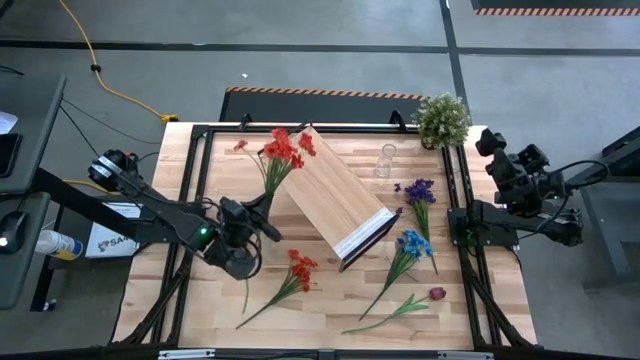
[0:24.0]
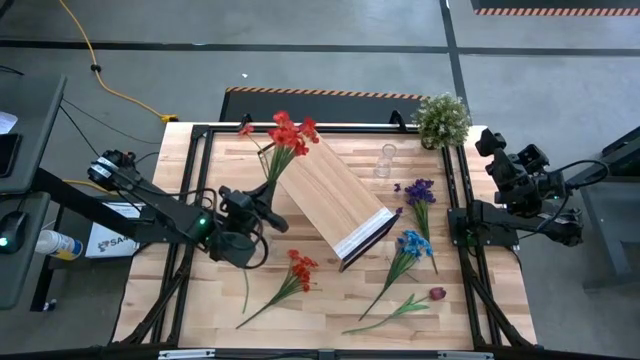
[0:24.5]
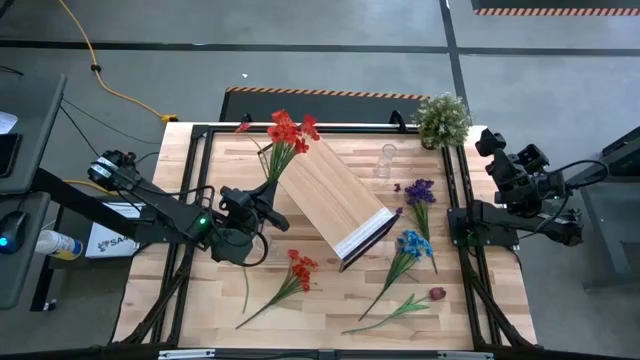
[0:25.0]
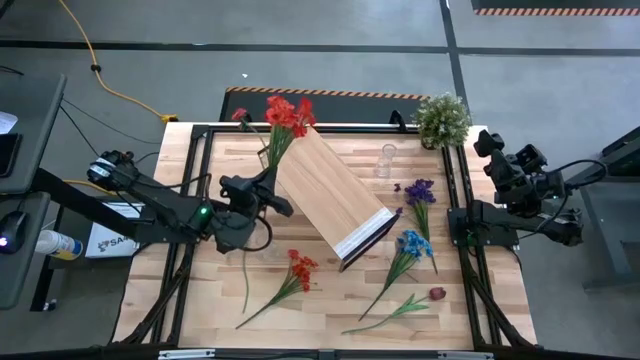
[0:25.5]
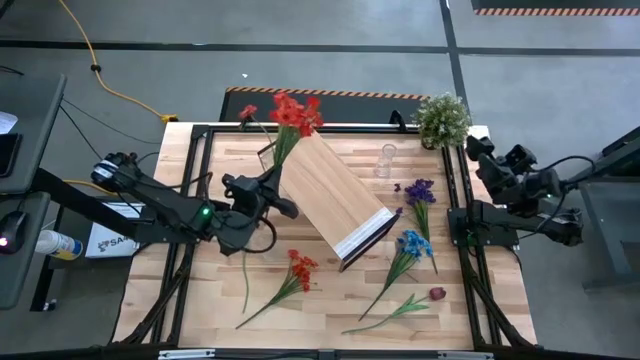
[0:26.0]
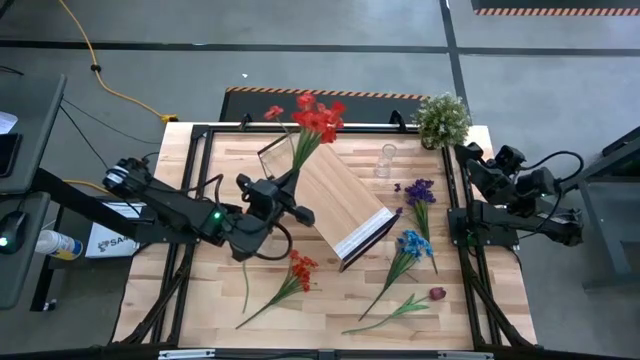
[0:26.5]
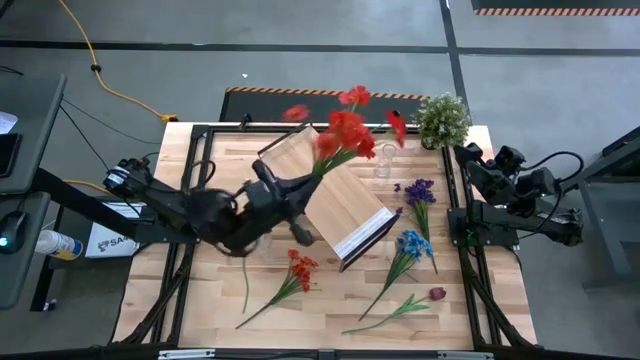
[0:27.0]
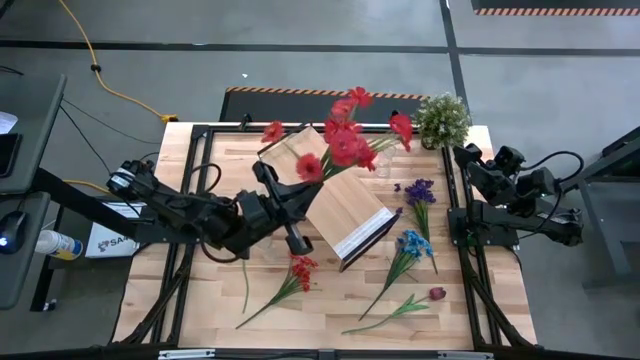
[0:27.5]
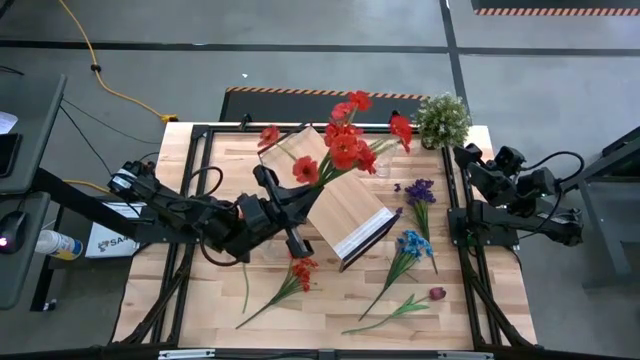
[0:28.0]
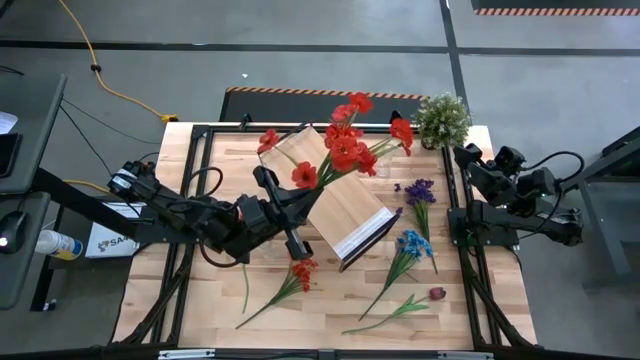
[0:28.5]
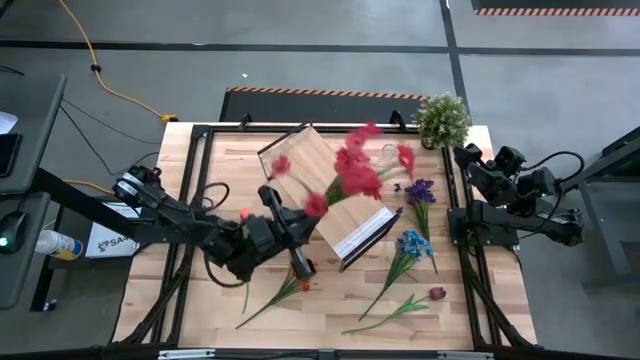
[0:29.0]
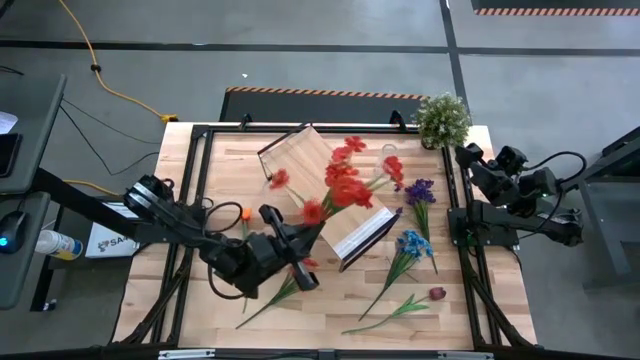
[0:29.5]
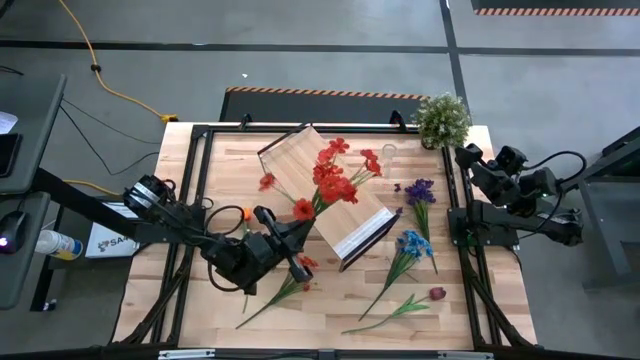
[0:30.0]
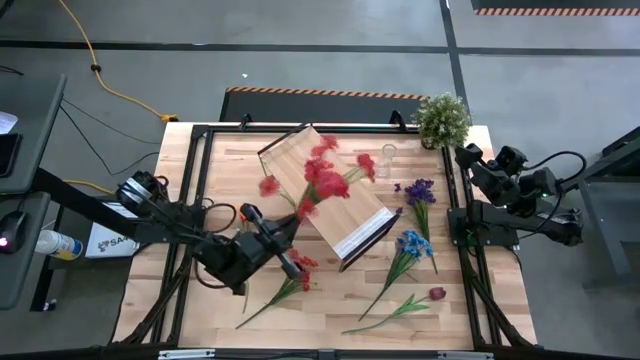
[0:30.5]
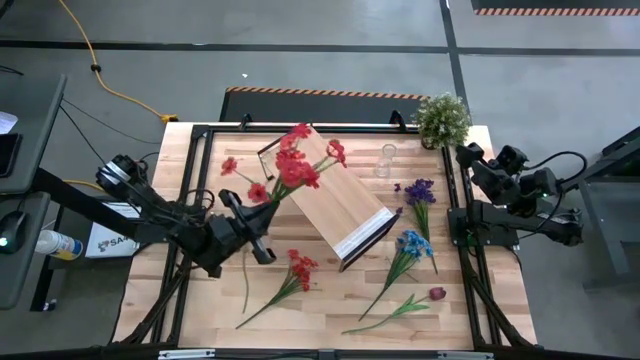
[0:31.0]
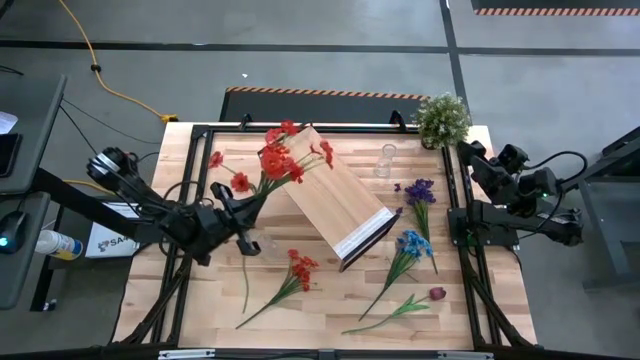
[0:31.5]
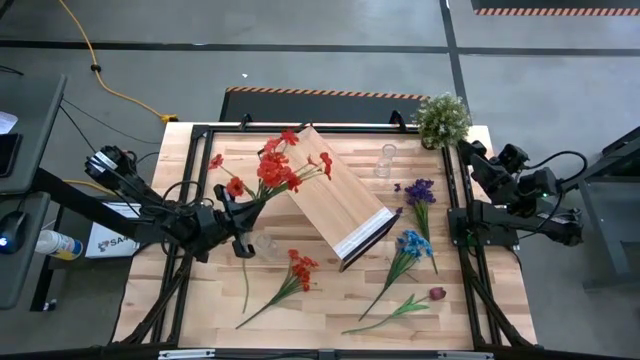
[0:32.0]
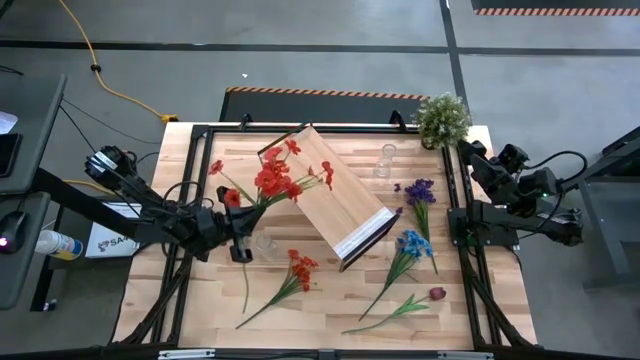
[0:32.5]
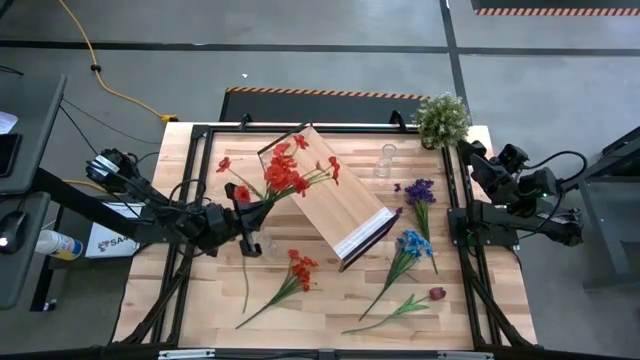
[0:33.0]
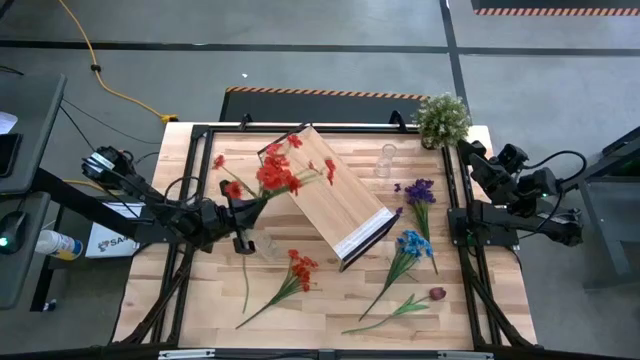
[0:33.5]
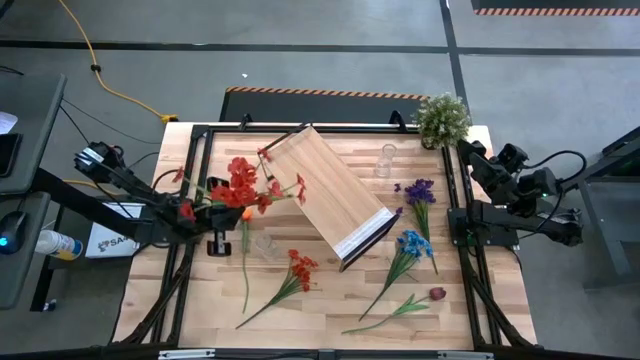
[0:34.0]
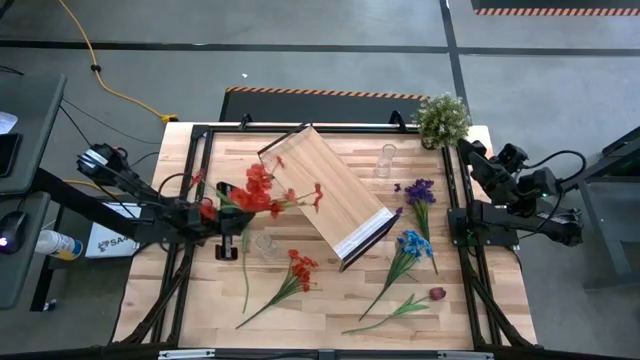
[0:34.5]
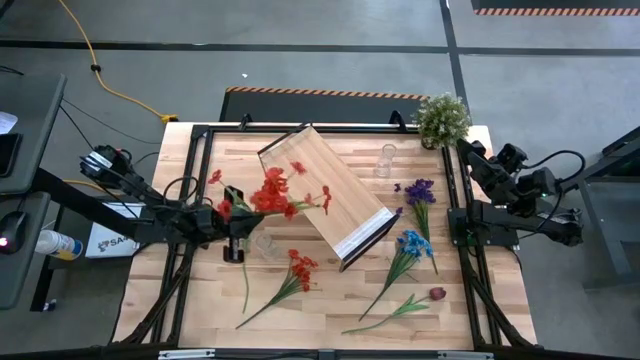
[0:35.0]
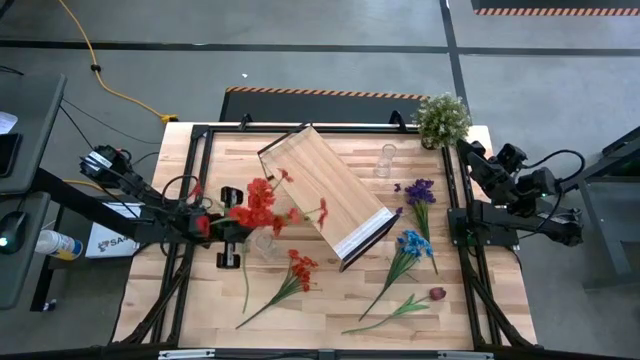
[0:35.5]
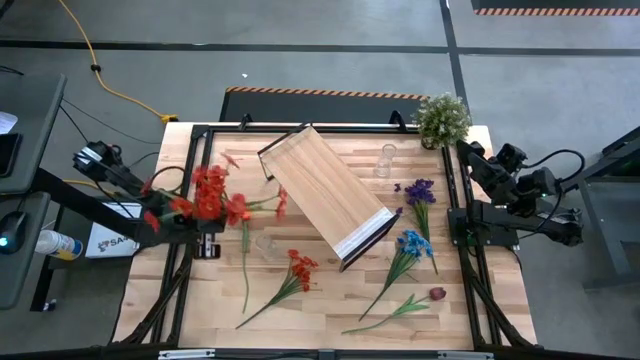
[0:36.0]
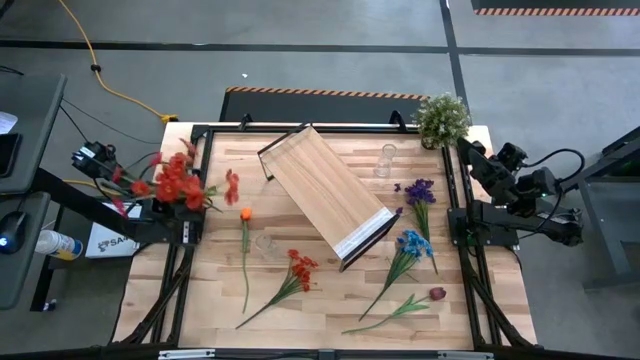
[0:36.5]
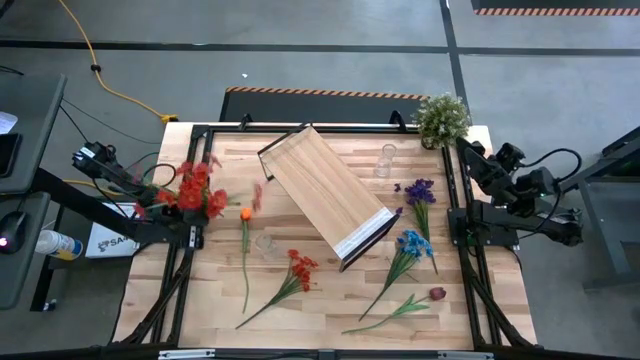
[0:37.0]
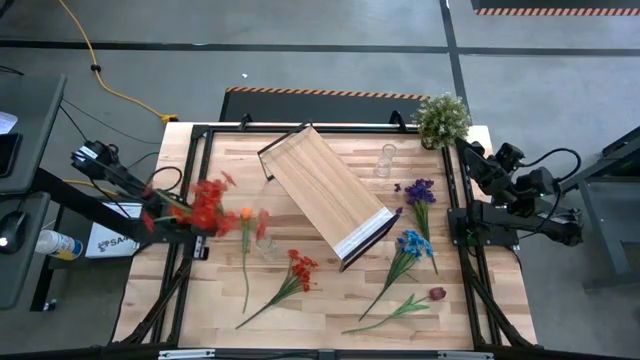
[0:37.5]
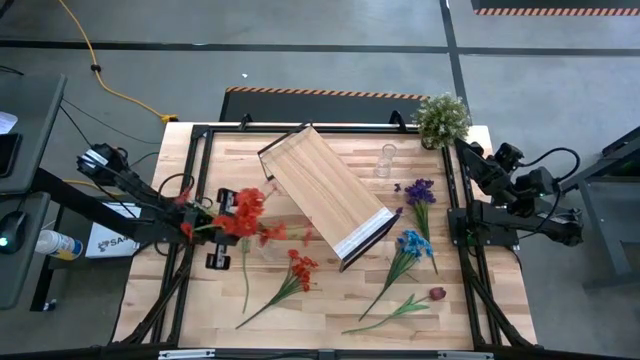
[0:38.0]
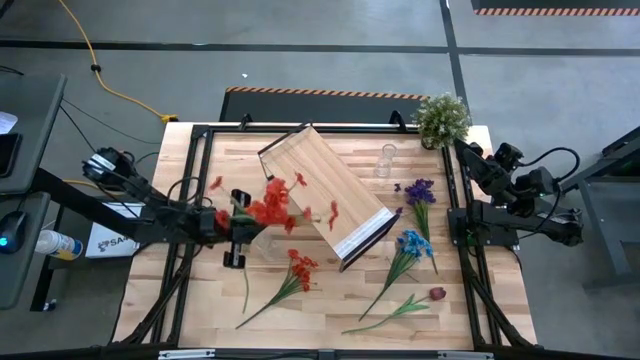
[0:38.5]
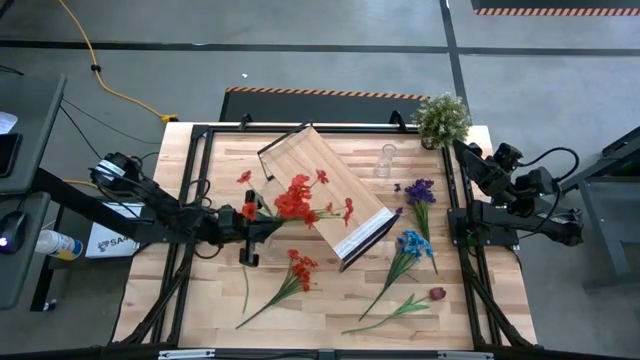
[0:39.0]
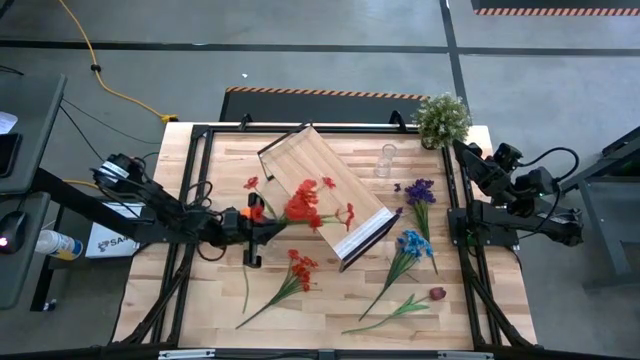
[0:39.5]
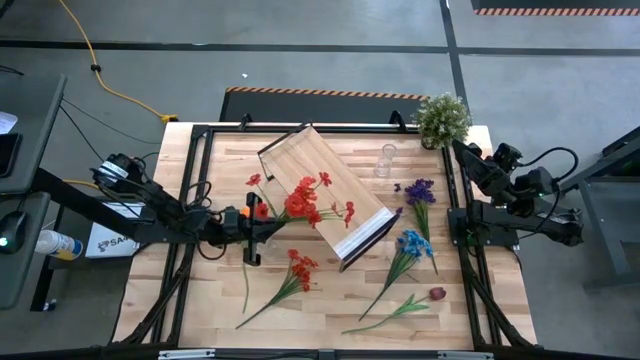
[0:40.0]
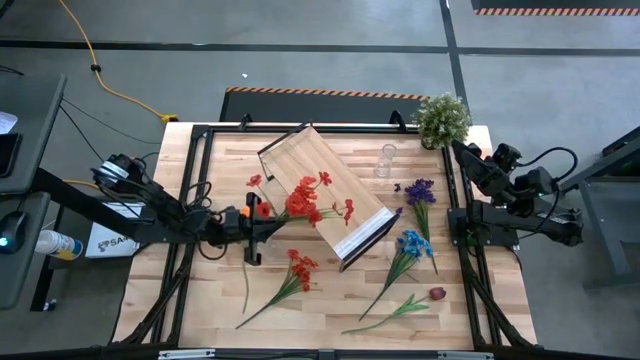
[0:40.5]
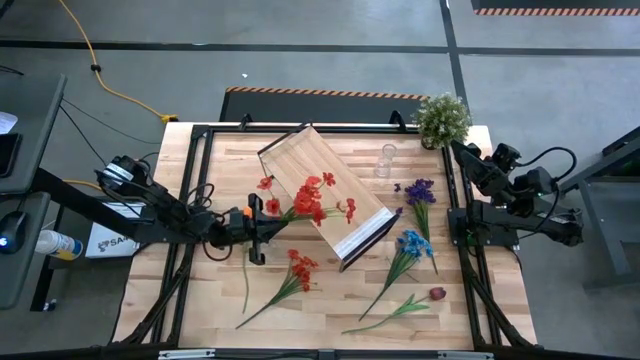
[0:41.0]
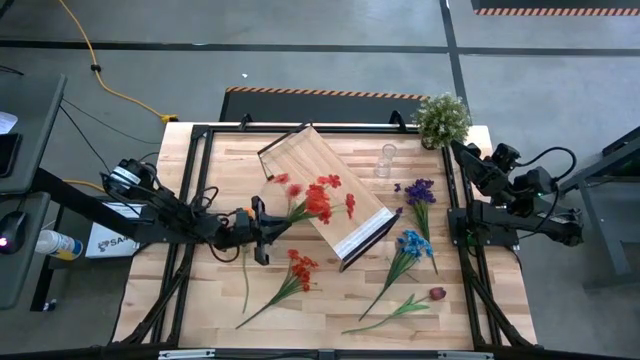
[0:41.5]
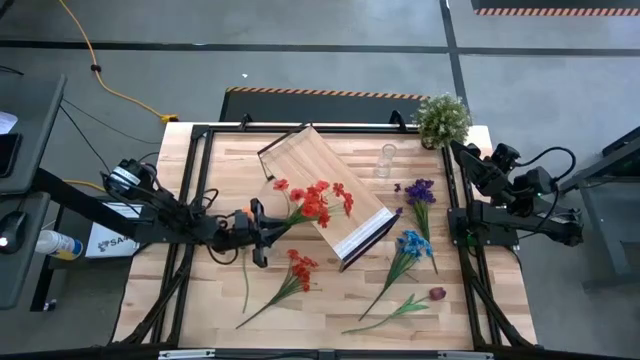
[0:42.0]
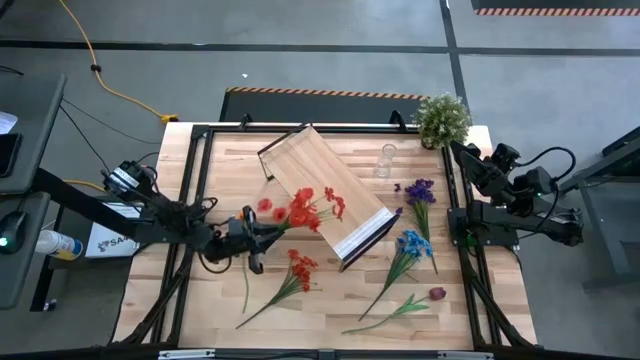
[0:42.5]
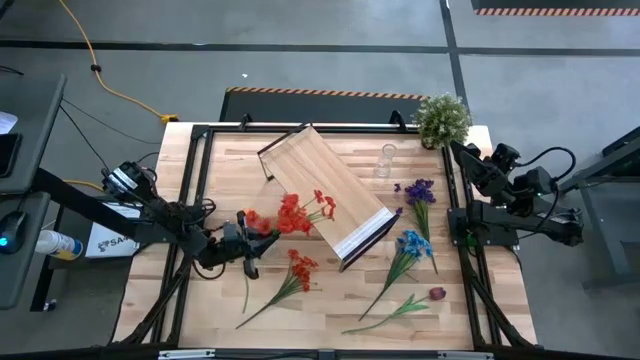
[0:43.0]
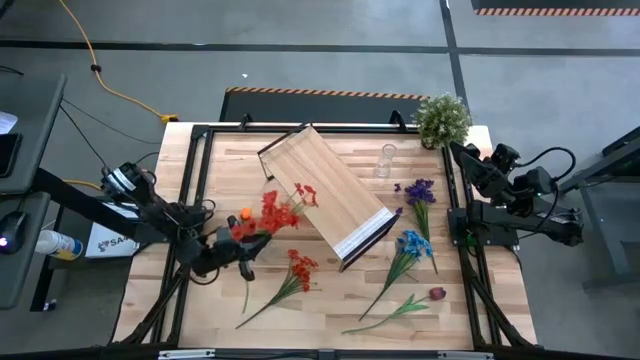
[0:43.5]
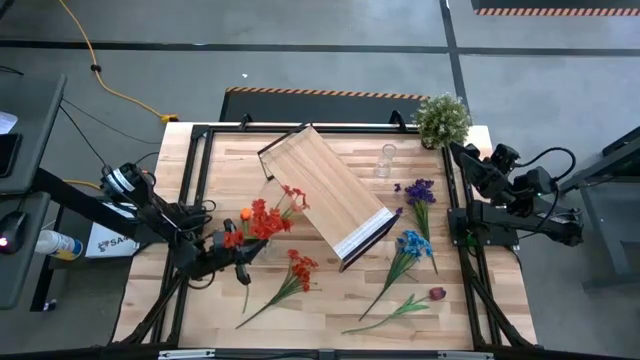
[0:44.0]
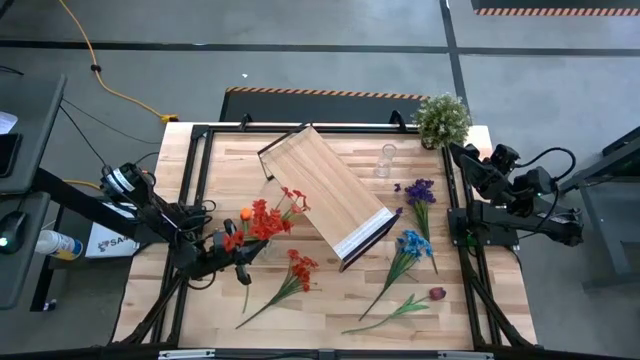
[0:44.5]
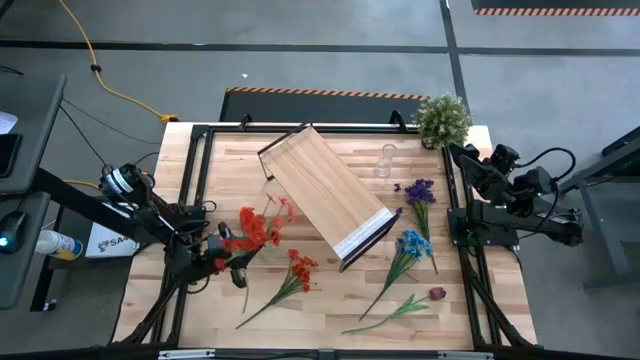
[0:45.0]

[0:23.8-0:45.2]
Task: Pick and place flowers into a vace then onto a shelf
Put the top red flowers into the bottom transparent vase

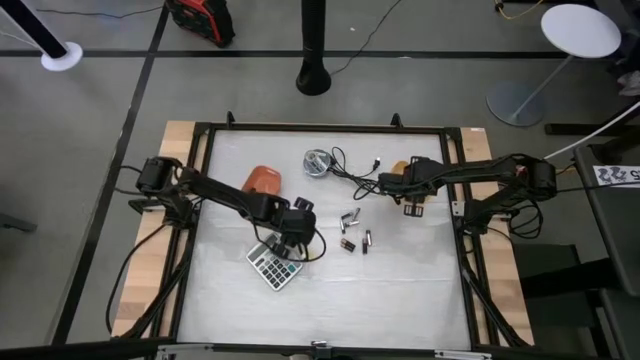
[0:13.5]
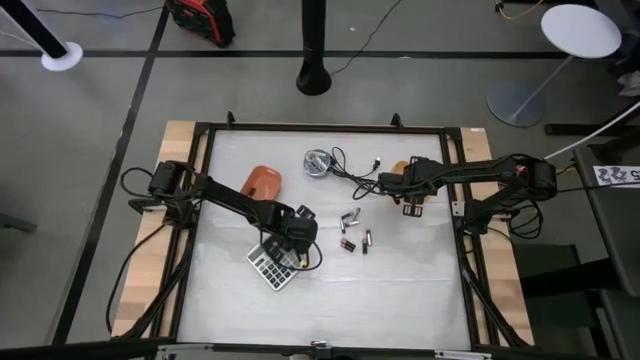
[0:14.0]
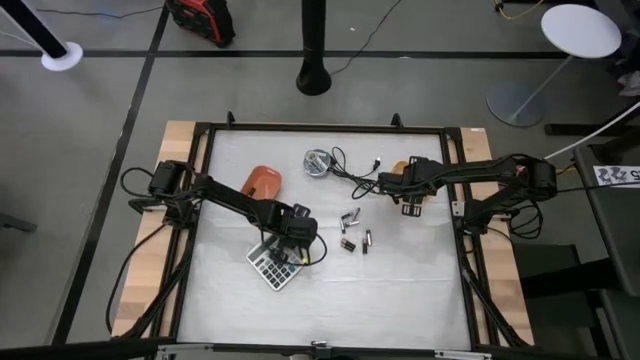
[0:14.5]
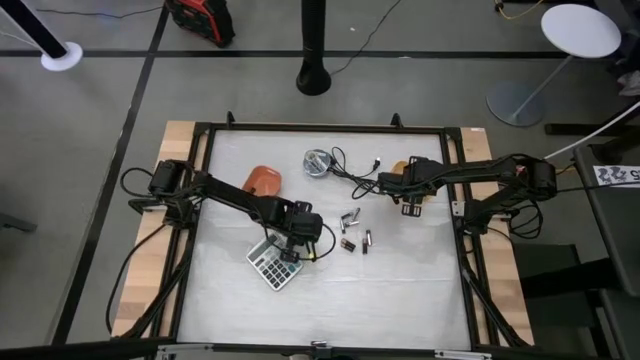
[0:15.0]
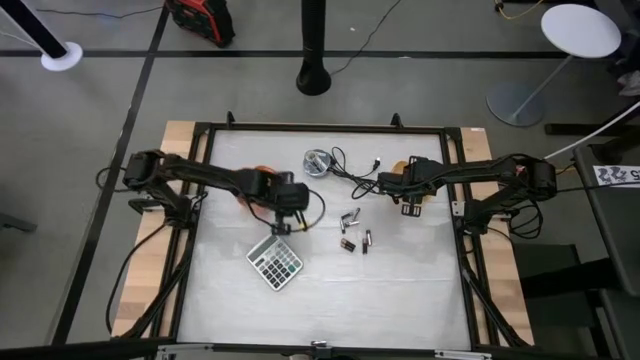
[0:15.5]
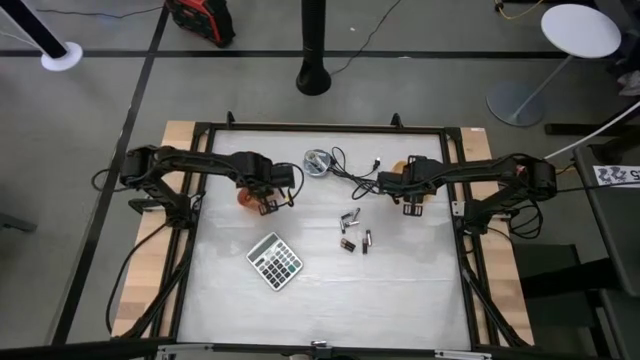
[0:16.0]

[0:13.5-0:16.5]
Task: Sort batteries
Put the black battery into the orange bin
